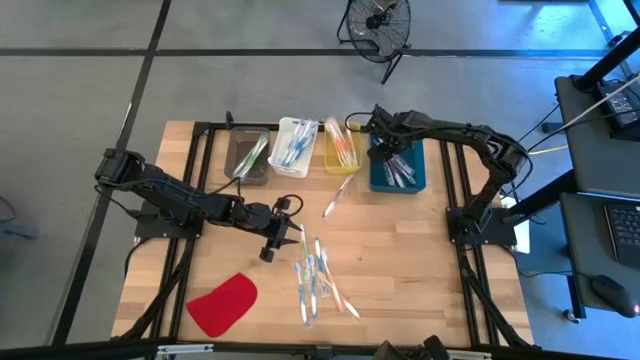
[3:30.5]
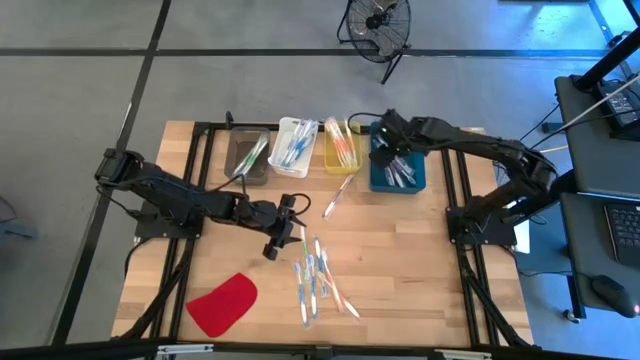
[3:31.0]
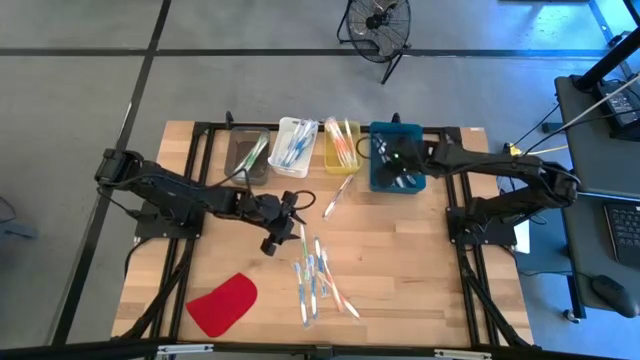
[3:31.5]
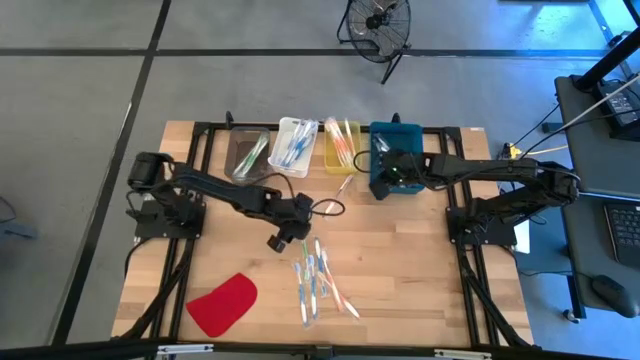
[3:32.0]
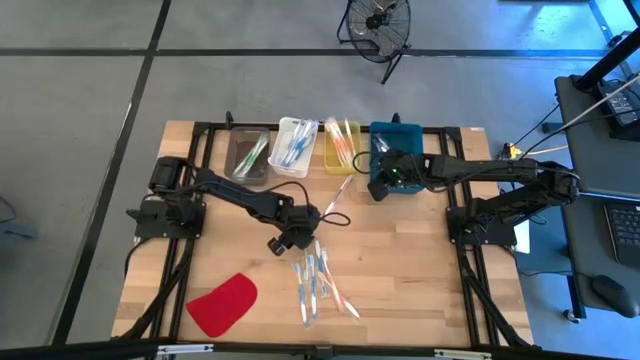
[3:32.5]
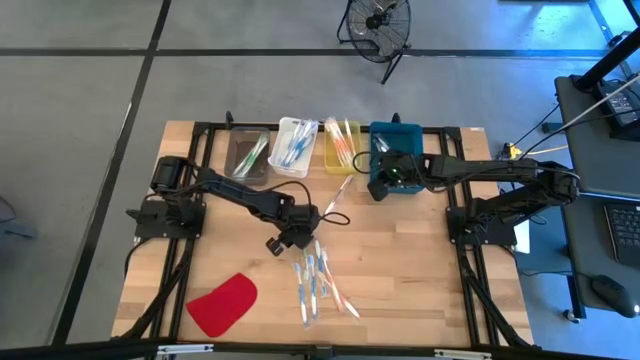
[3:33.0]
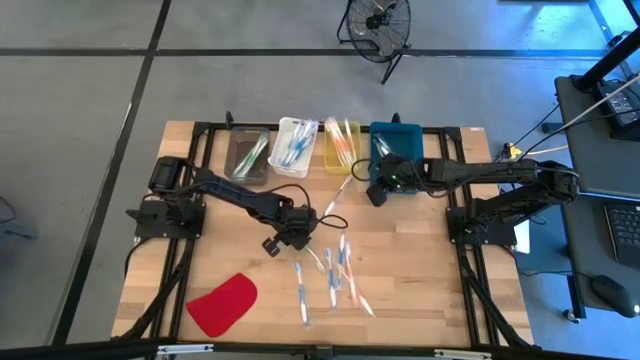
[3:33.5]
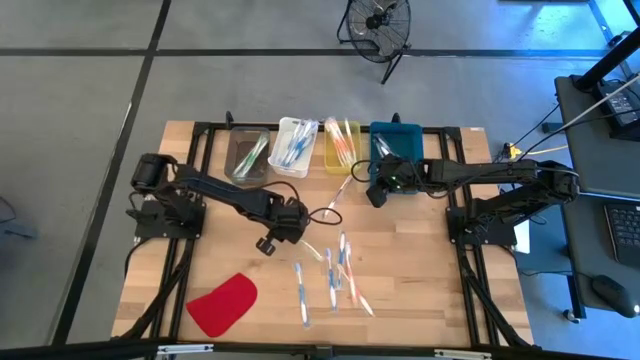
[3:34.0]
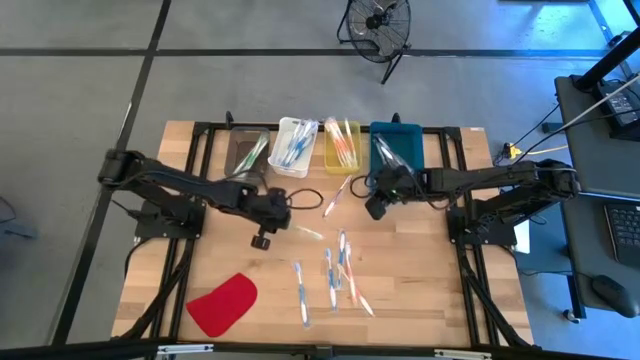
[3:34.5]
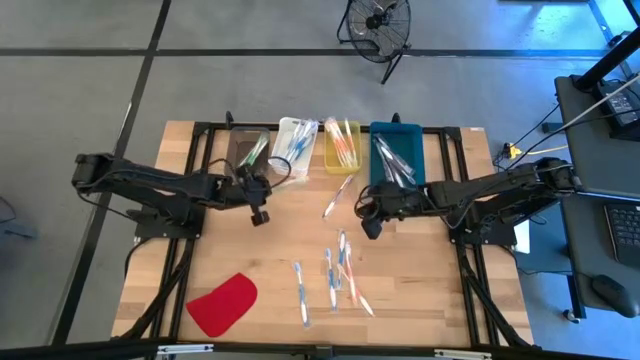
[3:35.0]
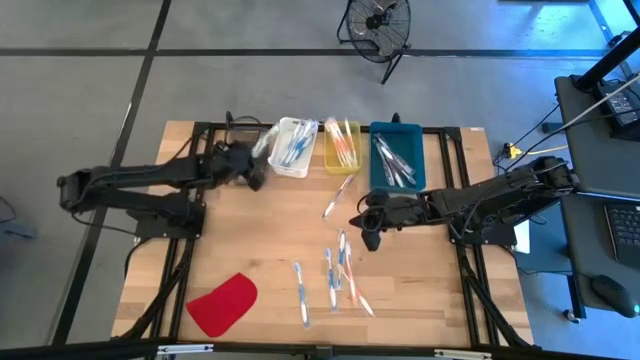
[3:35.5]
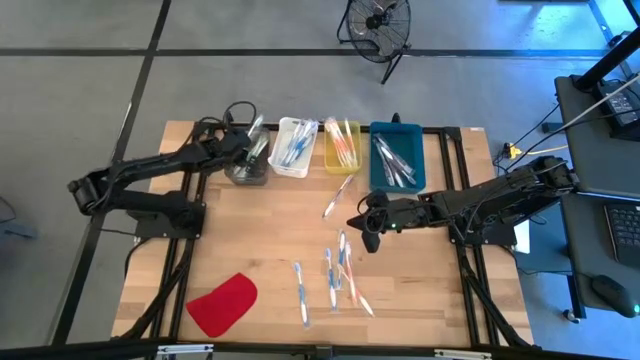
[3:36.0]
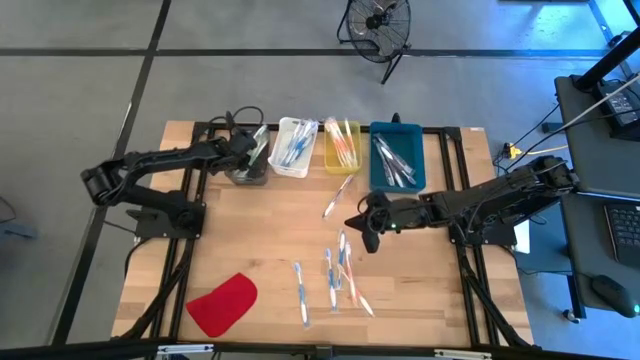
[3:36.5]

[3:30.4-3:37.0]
Task: Pick & Place Toothbrushes
Put the green toothbrush into the black bin

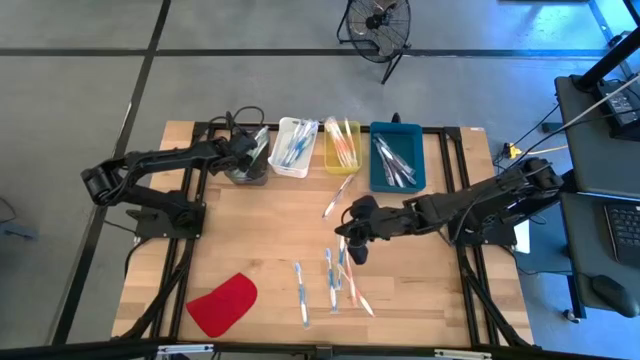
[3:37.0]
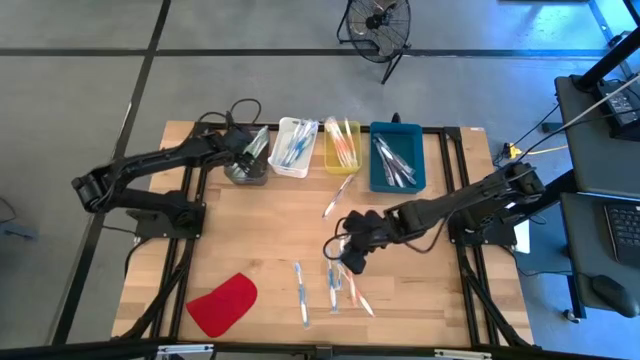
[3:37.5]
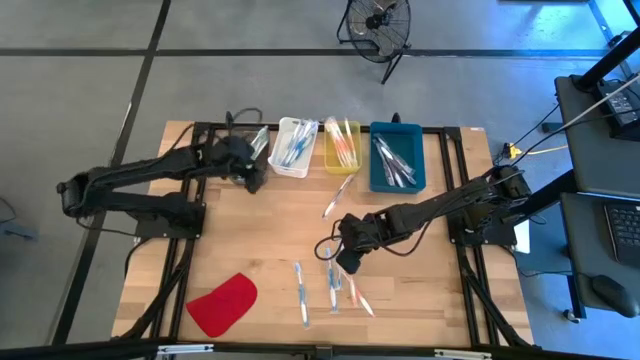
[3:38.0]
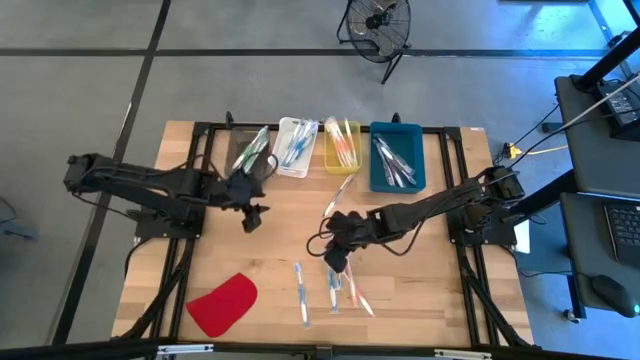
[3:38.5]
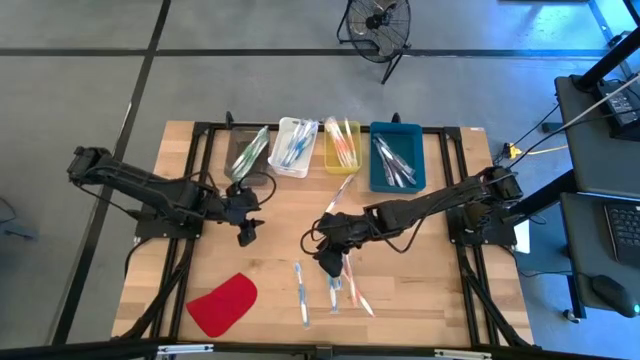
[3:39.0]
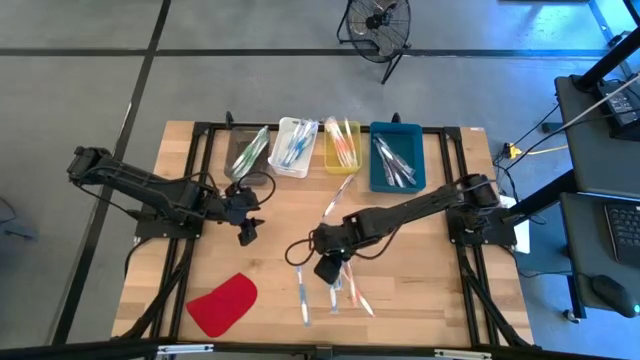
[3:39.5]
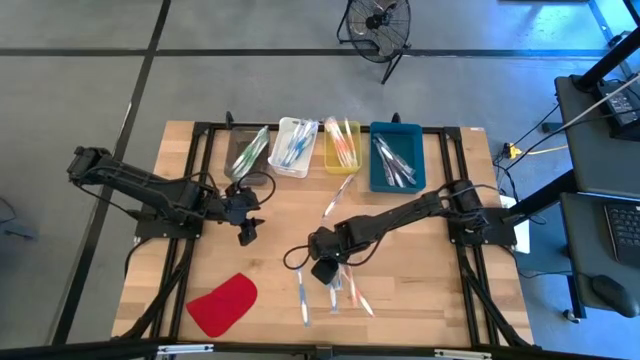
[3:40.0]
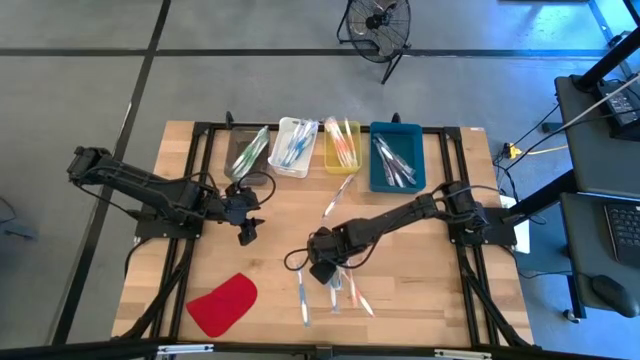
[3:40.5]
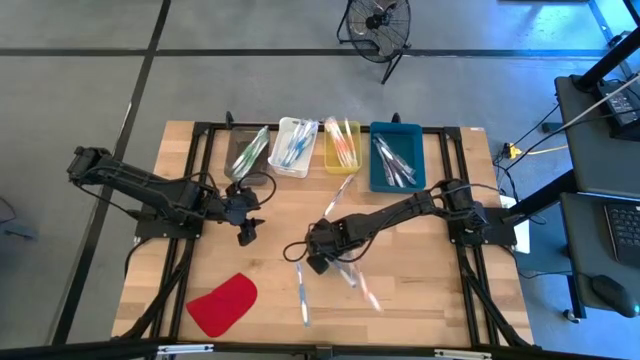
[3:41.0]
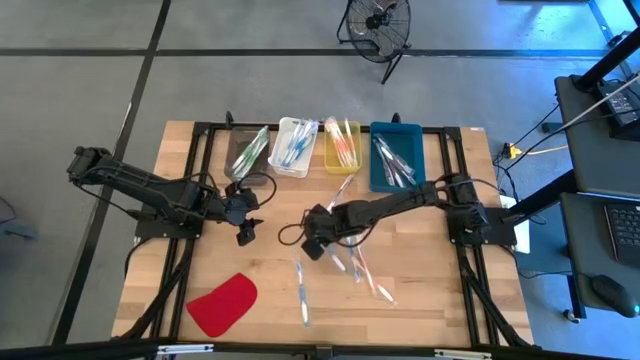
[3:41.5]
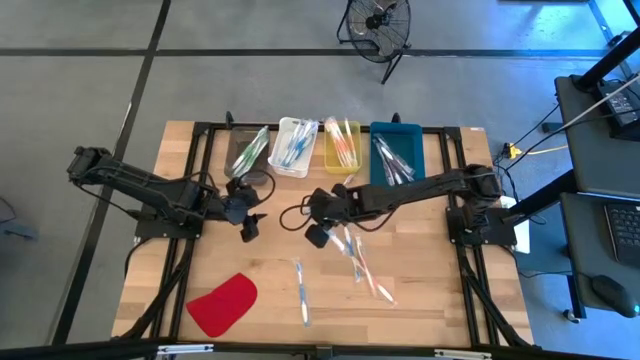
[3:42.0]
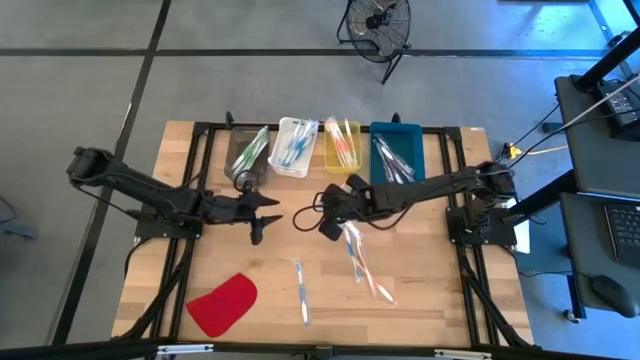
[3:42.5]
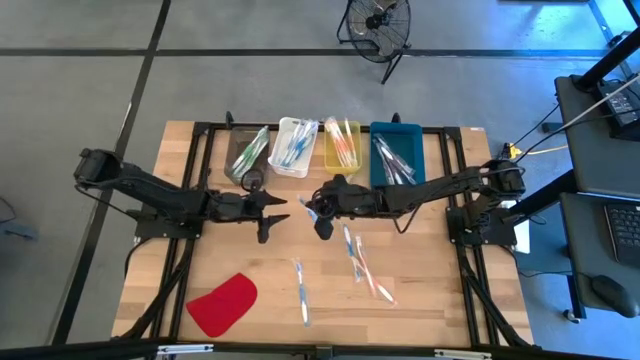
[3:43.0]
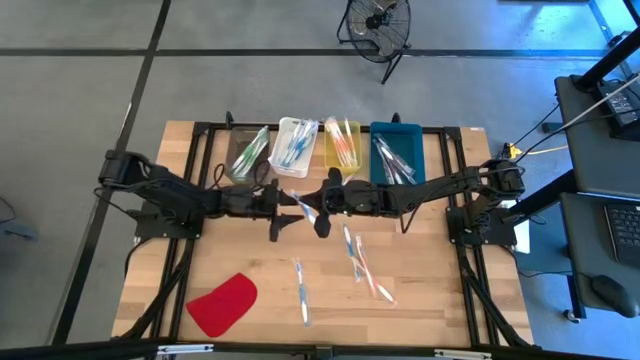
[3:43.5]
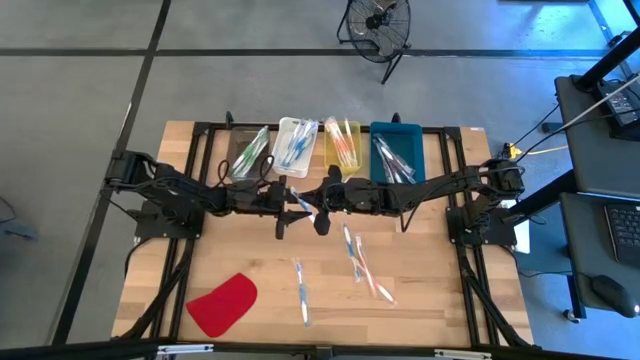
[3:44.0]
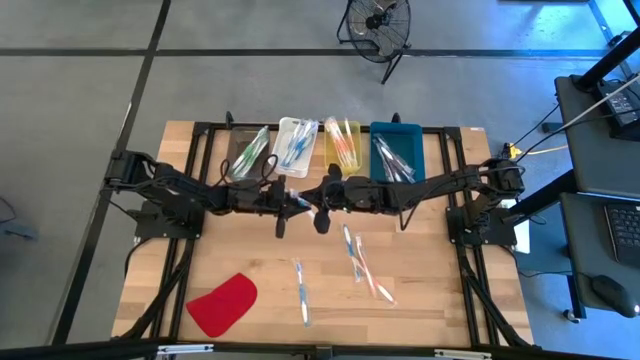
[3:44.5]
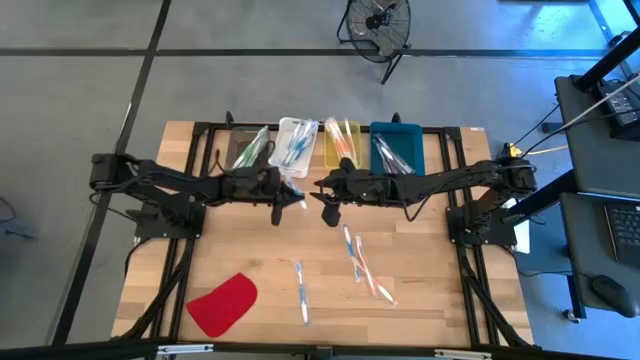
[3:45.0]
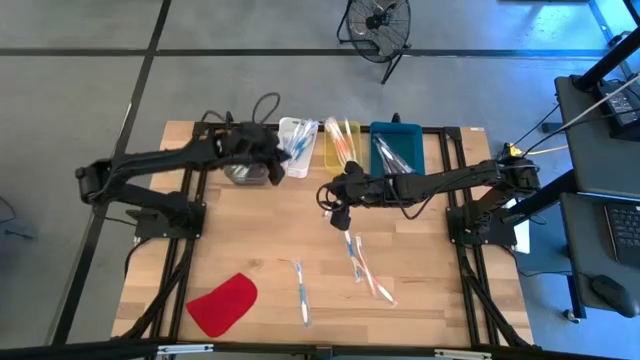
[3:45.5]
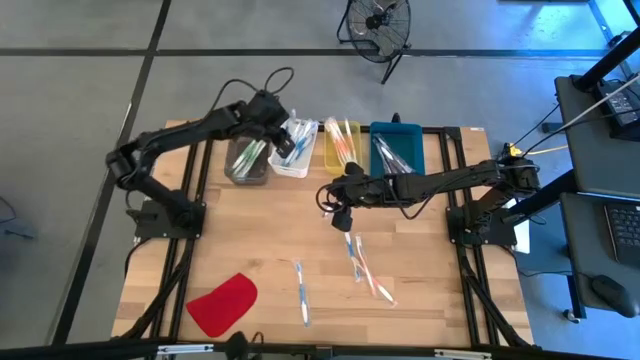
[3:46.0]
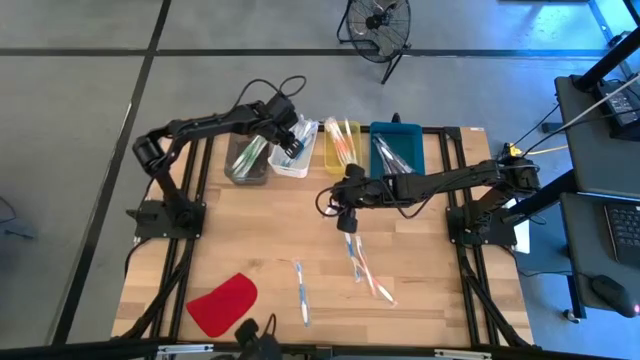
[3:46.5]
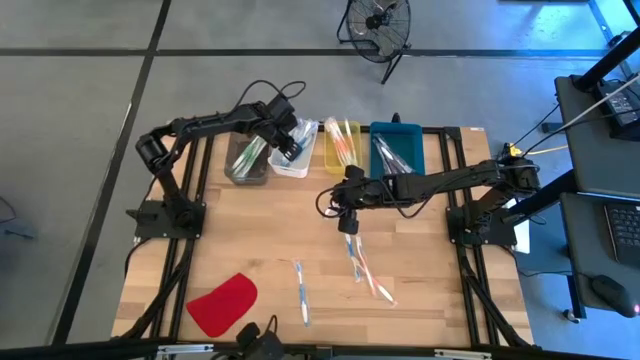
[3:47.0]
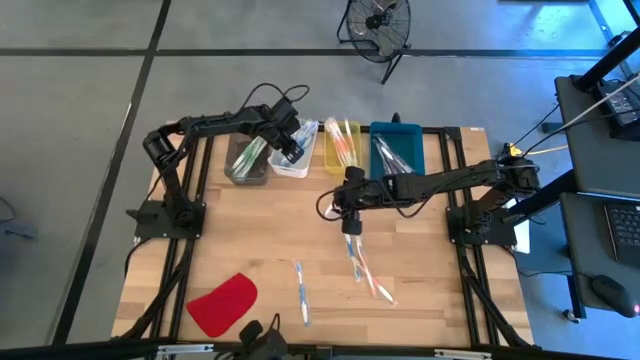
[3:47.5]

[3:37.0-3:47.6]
Put the blue toothbrush into the white bin

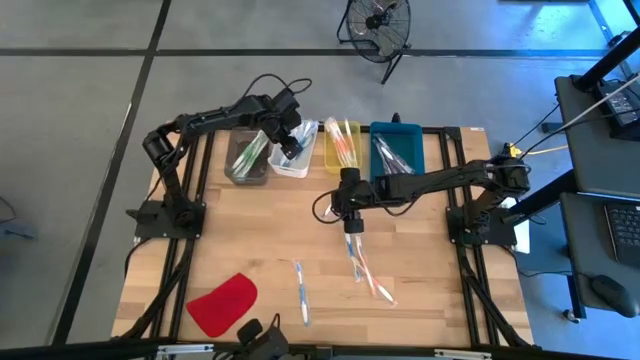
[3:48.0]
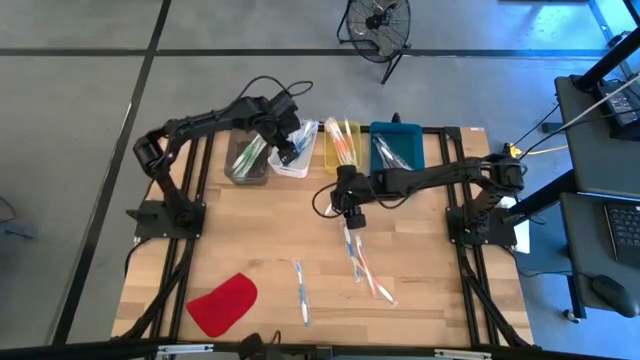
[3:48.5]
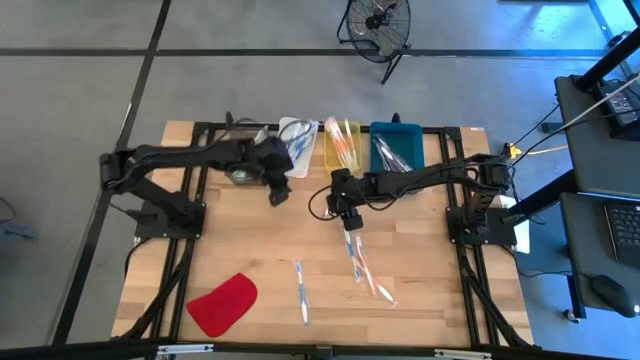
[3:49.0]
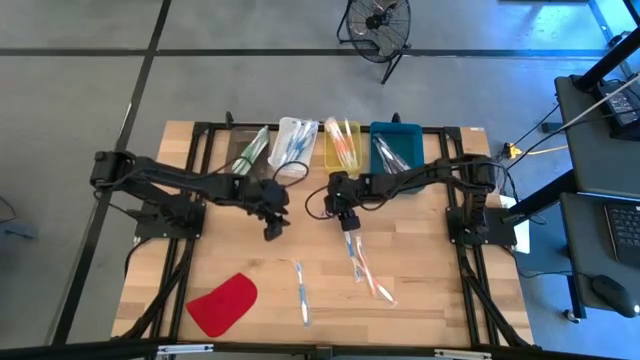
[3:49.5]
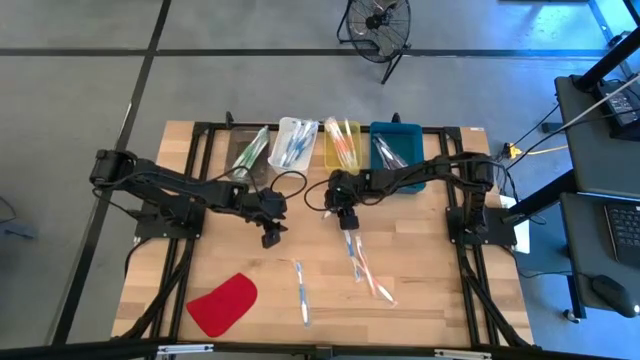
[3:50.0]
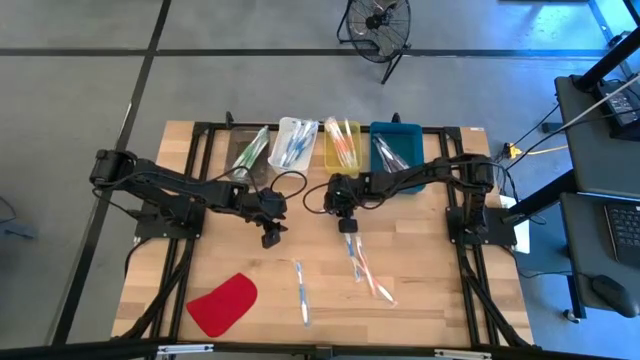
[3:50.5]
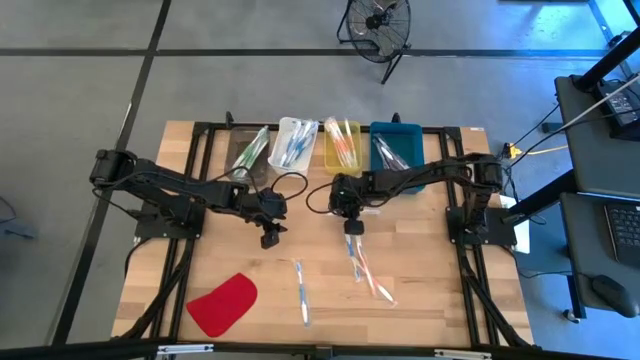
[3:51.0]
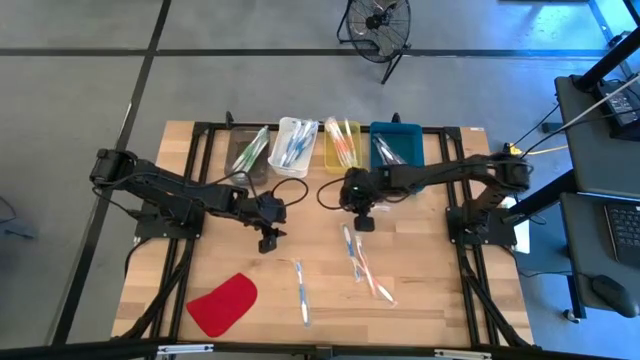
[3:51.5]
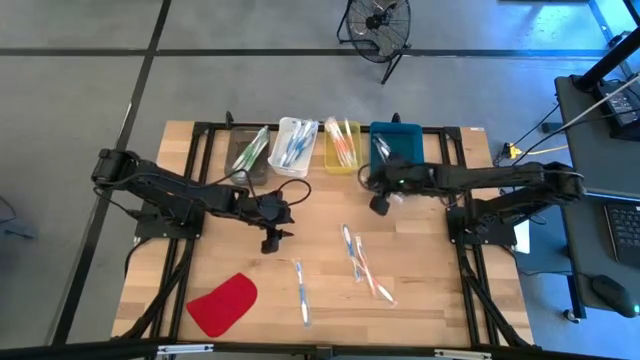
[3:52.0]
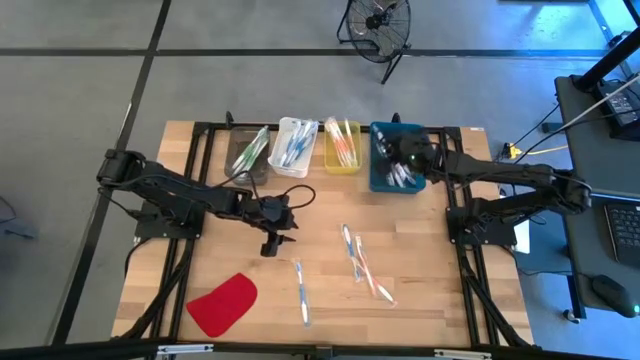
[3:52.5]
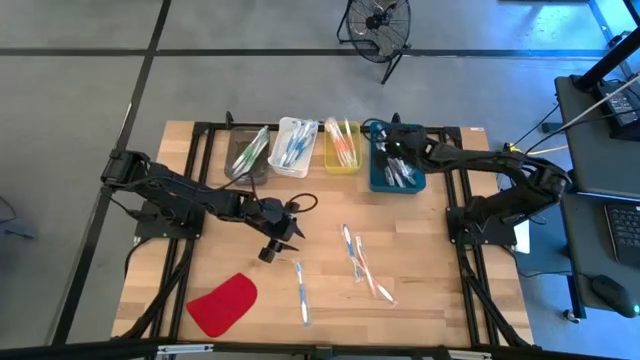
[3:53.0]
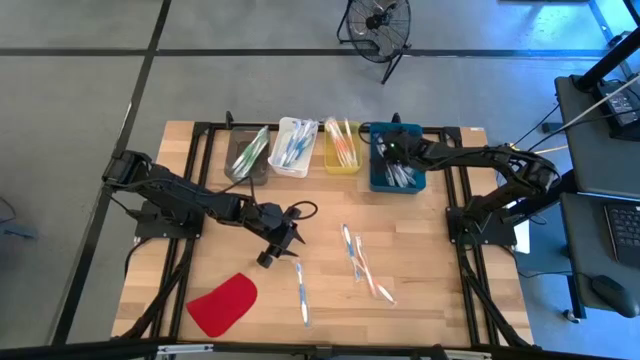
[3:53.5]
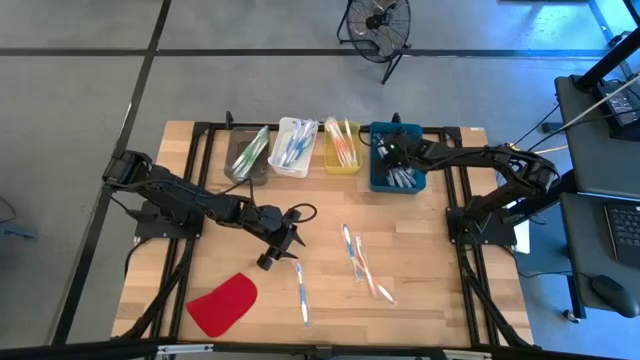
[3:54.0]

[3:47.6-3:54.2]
Put the violet toothbrush into the blue bin
